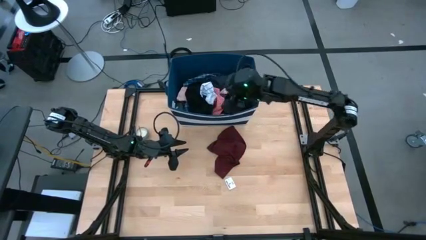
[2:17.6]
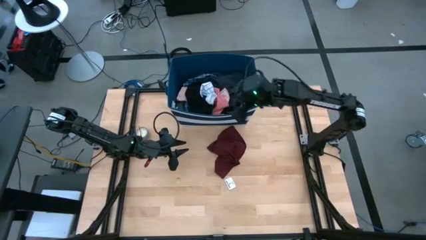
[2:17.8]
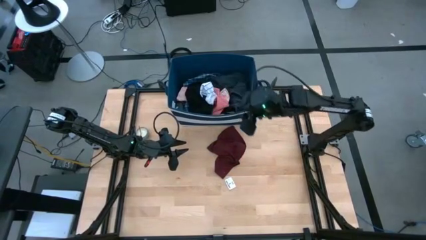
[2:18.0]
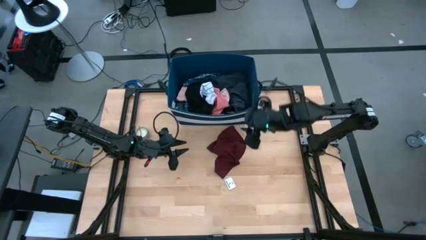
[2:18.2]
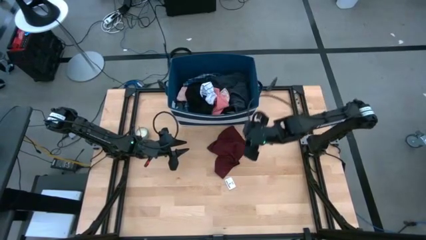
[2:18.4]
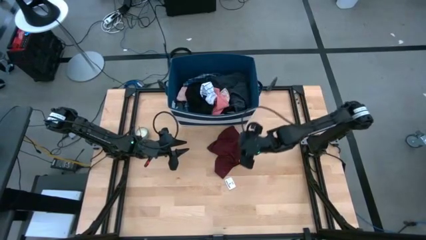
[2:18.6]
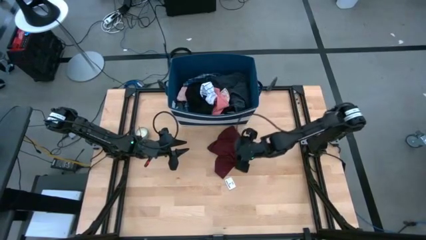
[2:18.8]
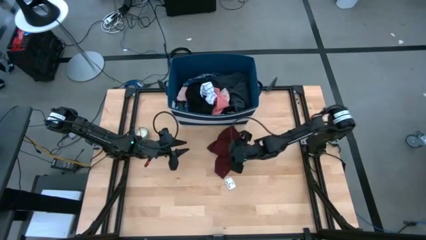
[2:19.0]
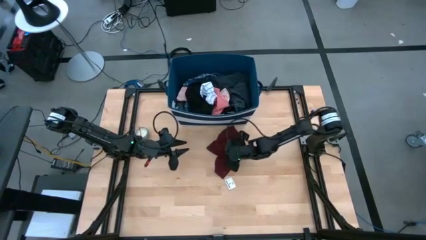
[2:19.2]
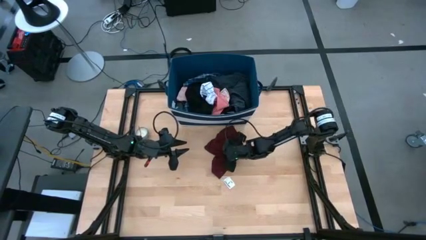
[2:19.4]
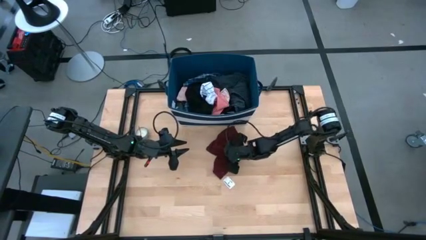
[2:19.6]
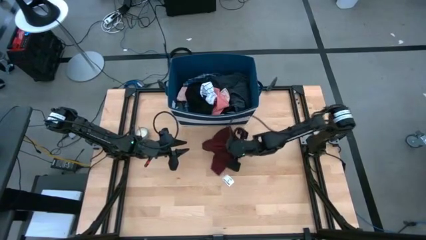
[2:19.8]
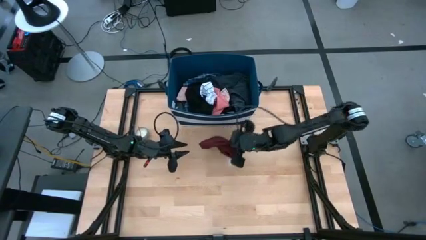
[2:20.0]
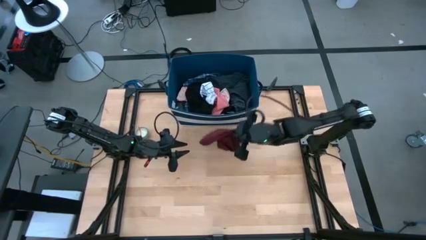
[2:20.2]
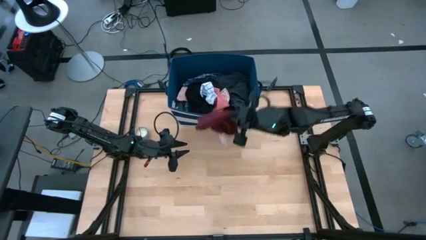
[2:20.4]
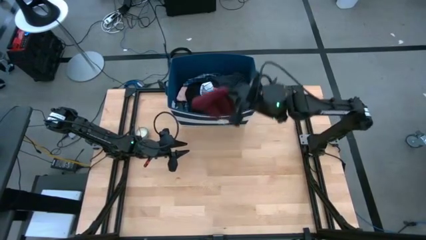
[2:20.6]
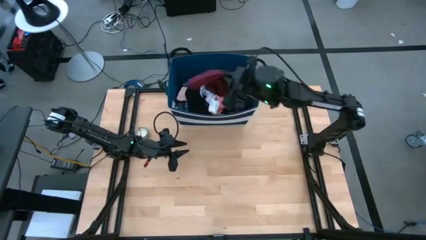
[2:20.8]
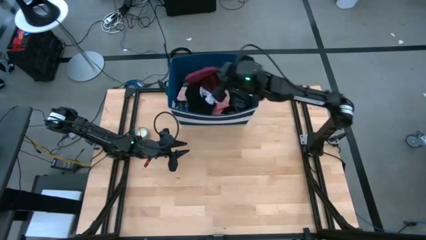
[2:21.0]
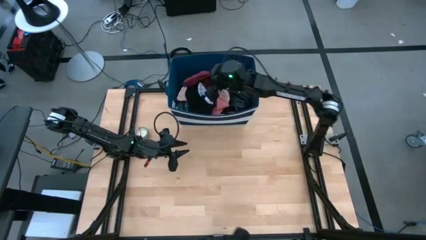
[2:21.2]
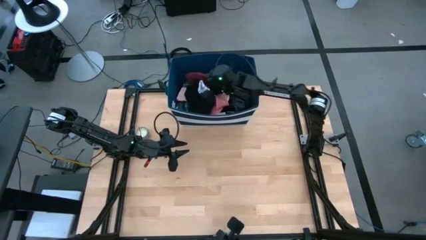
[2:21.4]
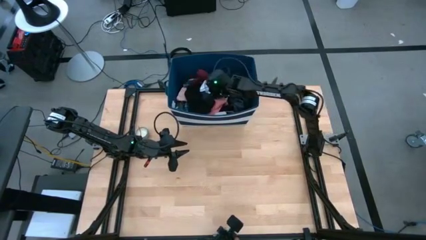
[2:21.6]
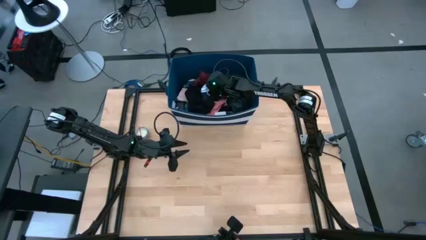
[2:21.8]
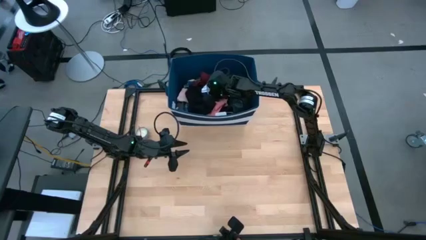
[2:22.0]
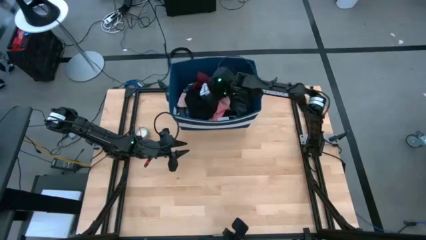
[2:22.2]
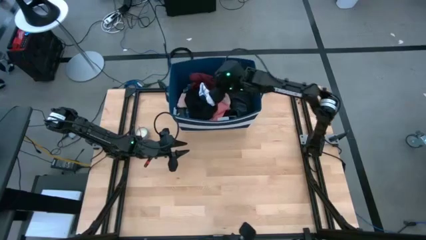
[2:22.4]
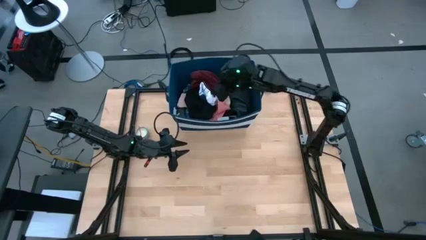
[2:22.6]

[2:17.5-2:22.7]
Task: Sort clothes
Put the red short into the laundry organizer

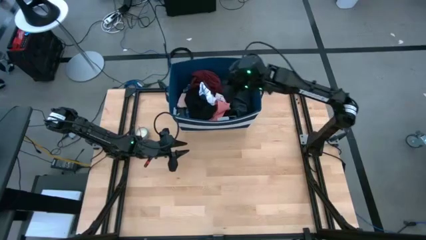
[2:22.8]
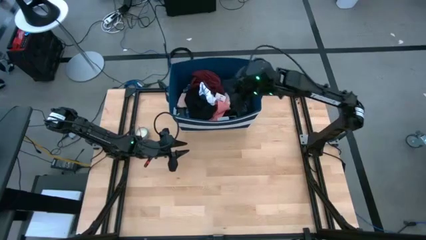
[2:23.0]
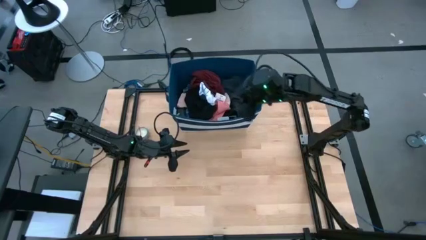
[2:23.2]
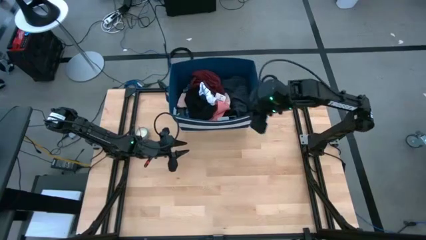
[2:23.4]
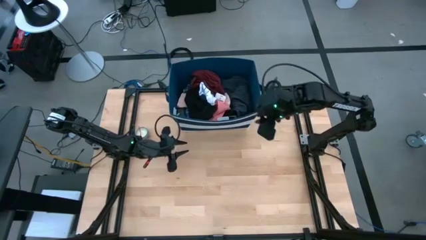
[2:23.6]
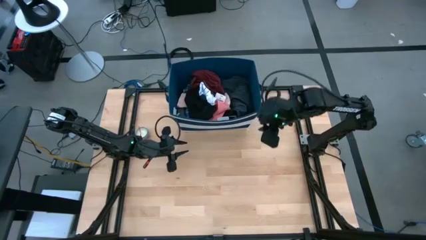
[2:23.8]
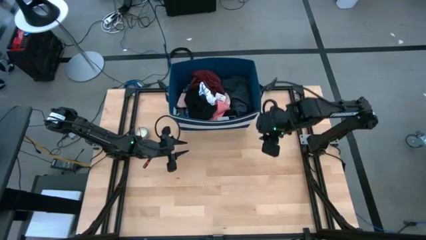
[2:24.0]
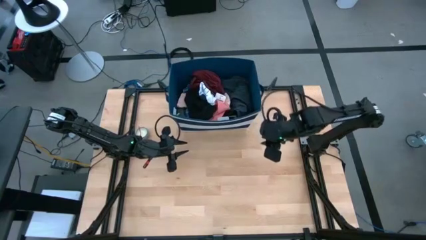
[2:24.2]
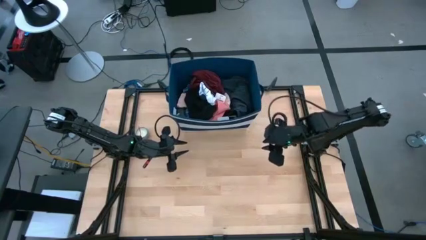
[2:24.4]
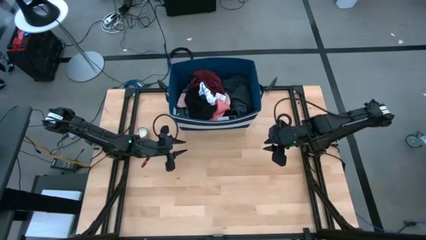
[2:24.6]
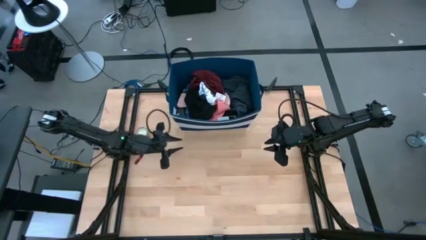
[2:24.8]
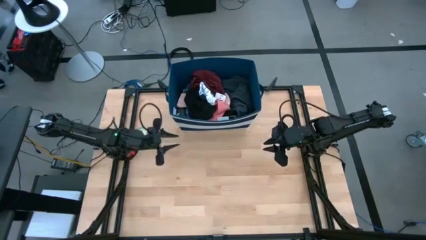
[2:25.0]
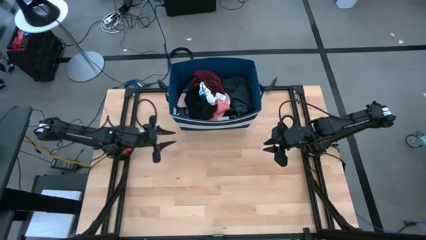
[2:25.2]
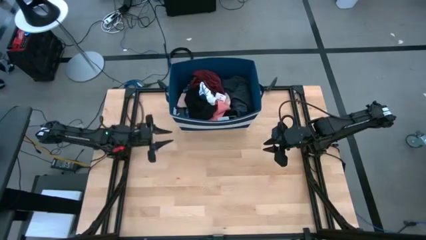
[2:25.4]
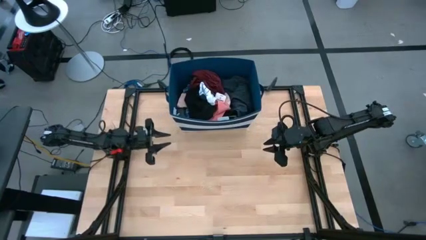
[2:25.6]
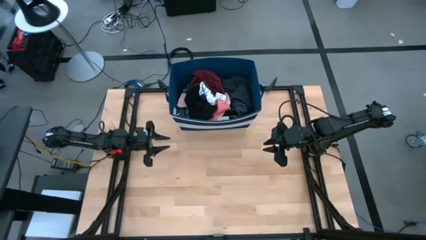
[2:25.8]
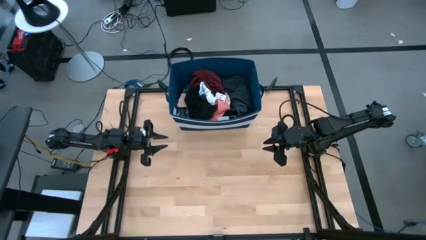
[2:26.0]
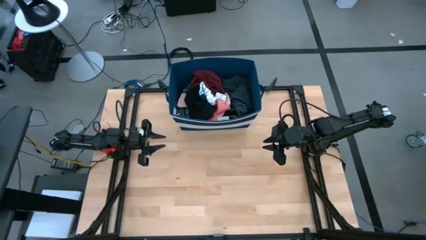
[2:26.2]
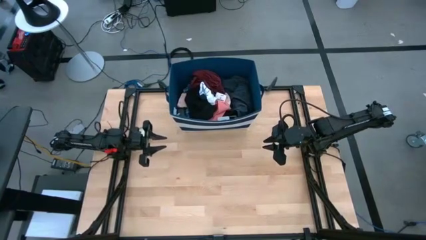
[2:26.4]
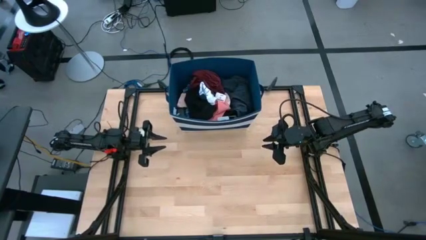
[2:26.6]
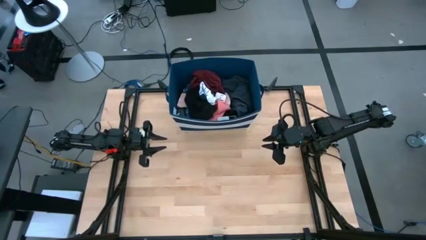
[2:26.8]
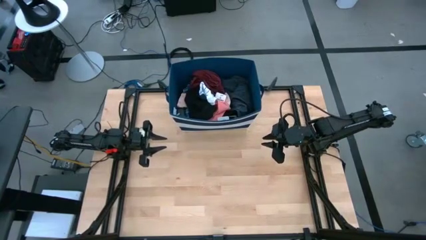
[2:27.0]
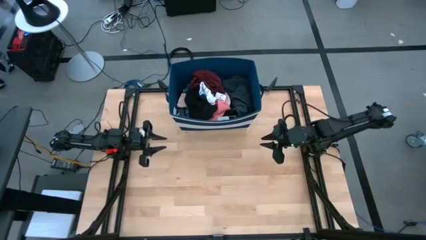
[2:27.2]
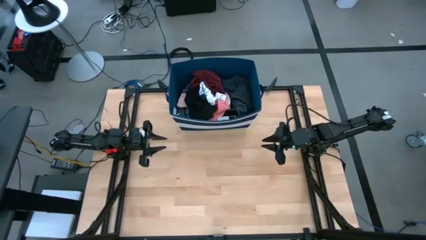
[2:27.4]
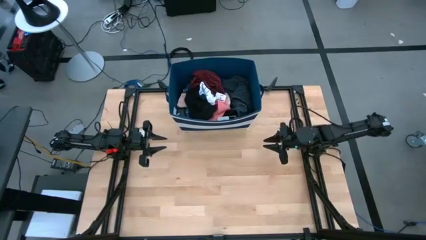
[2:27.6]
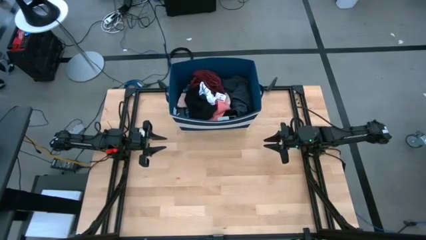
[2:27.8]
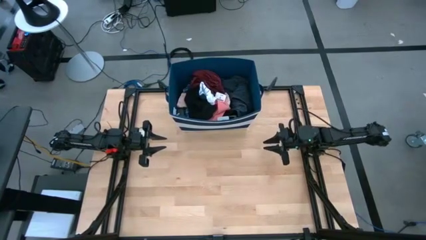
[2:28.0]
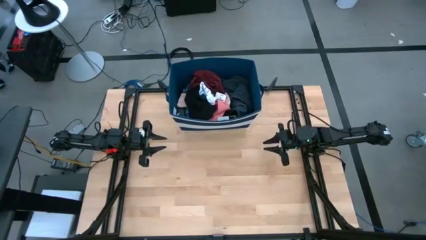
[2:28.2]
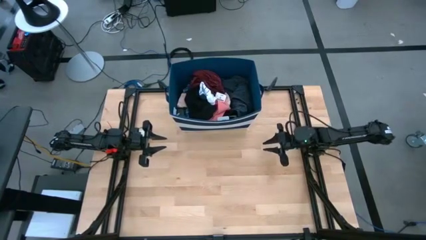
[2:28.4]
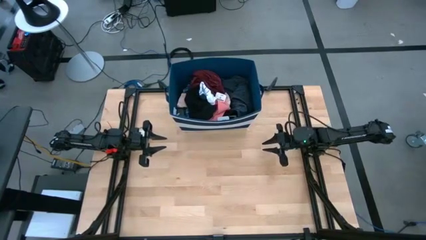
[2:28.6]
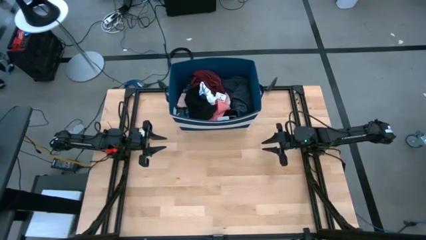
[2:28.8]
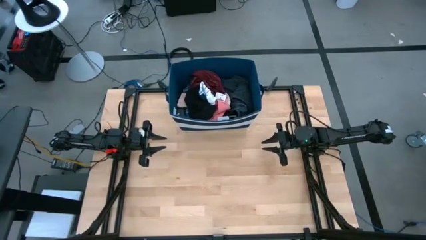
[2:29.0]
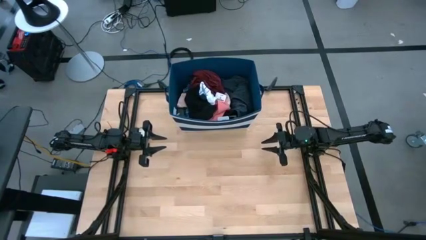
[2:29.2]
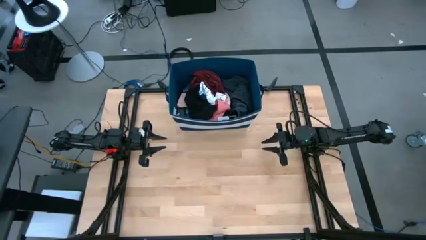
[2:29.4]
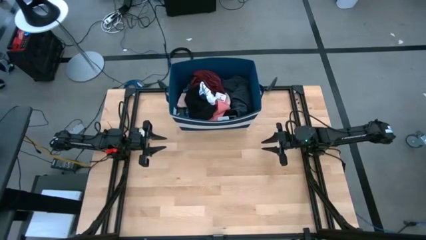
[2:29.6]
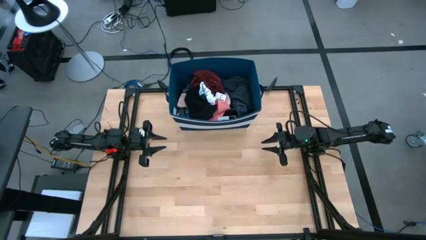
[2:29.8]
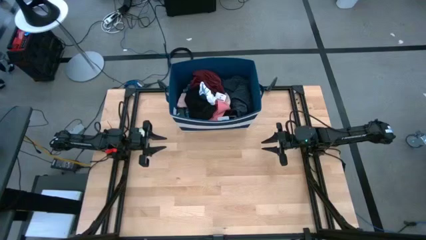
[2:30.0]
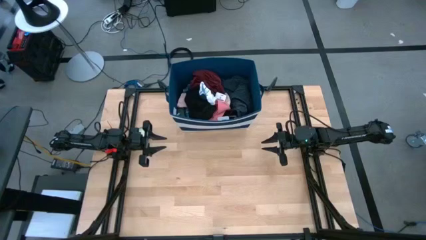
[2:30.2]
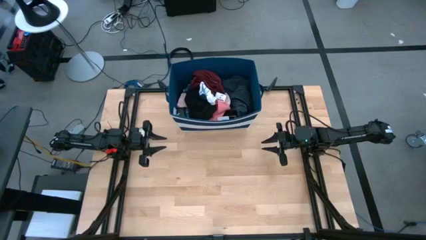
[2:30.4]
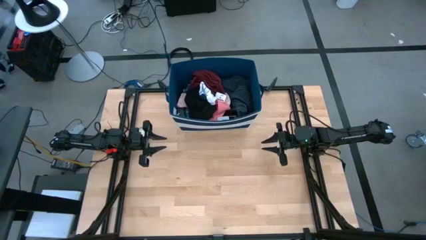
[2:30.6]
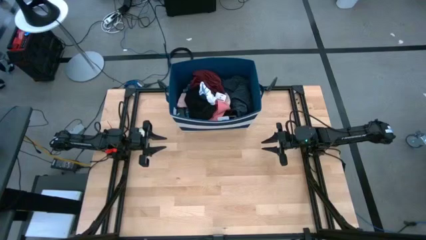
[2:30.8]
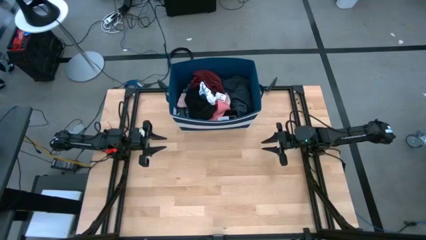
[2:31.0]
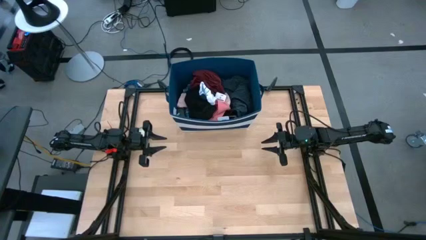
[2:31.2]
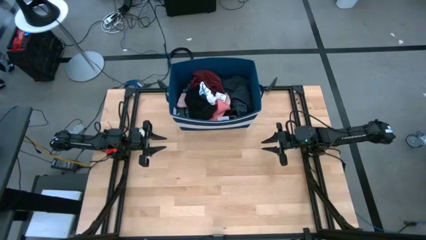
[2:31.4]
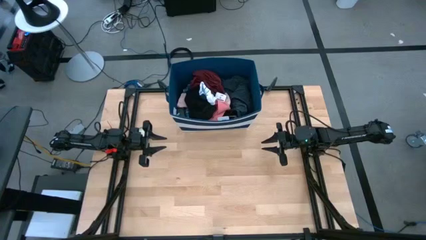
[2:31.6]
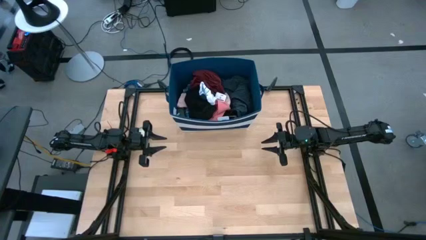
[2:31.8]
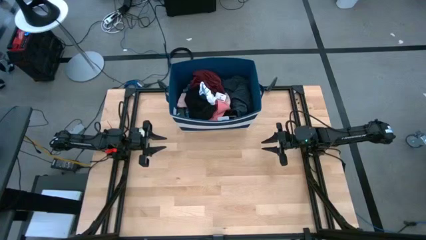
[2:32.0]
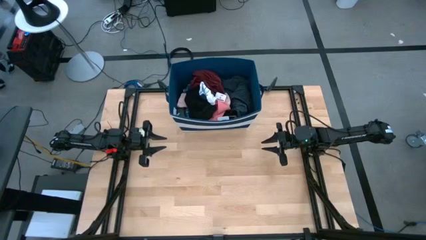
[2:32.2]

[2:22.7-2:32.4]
Return to Home Position
